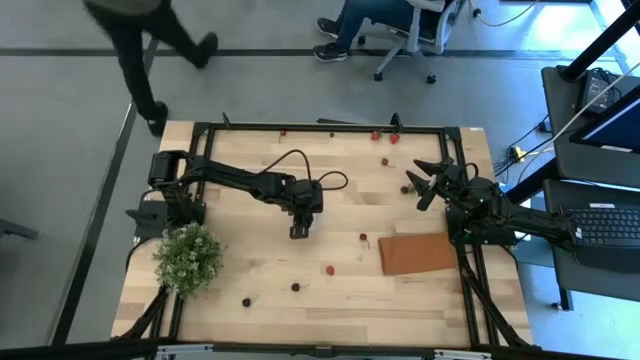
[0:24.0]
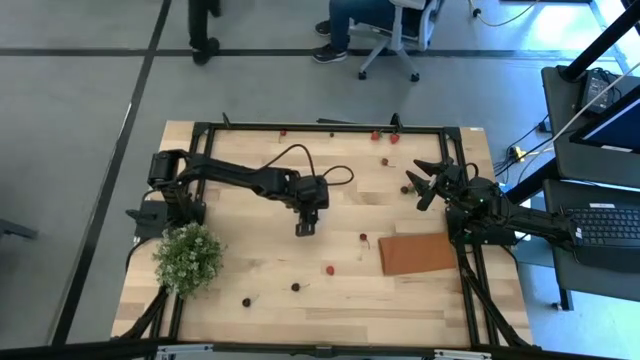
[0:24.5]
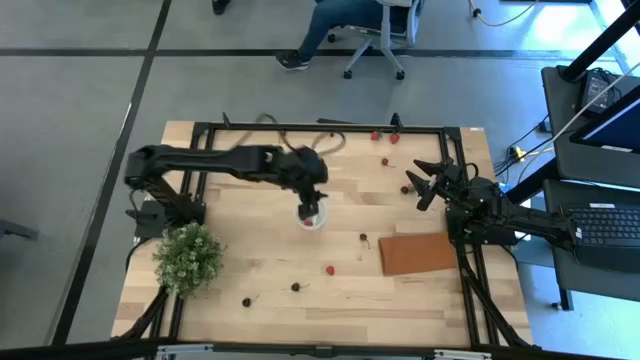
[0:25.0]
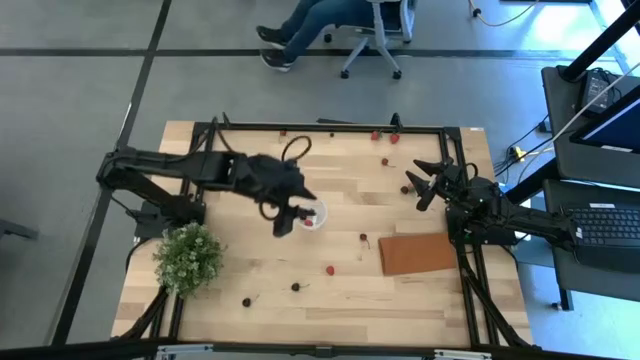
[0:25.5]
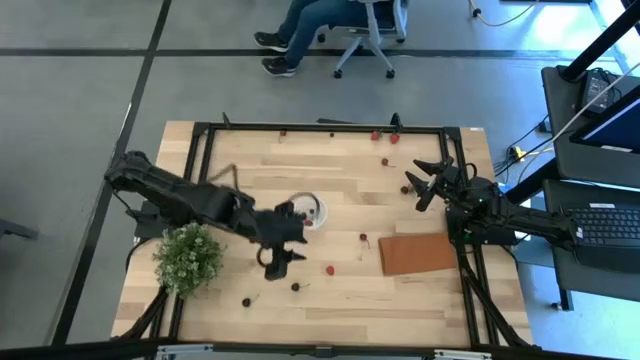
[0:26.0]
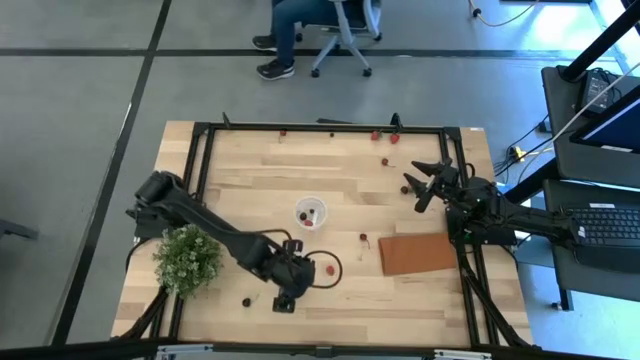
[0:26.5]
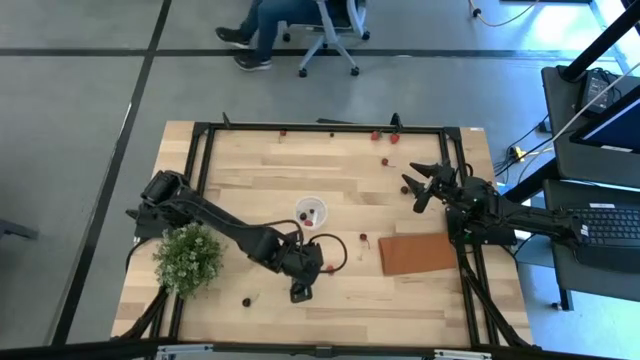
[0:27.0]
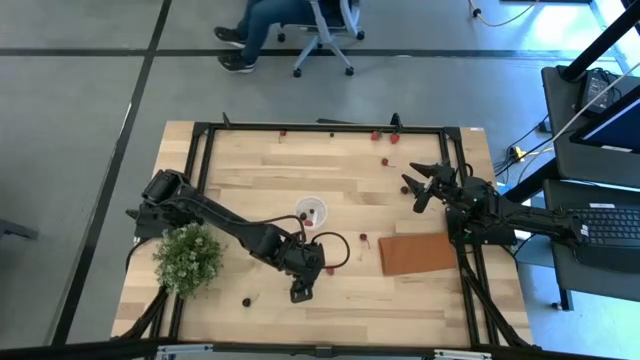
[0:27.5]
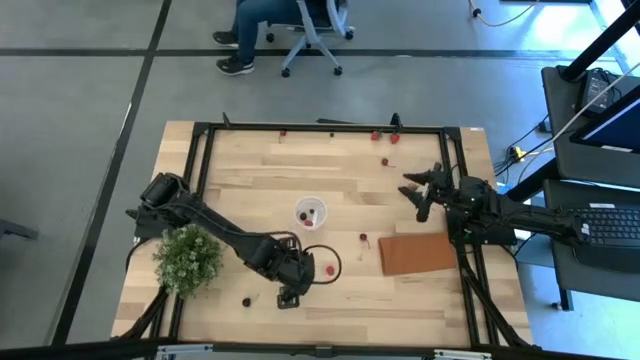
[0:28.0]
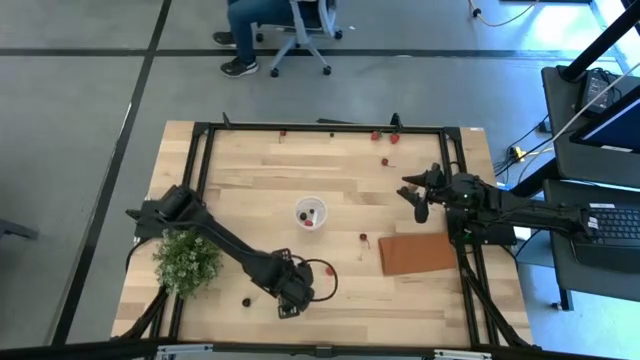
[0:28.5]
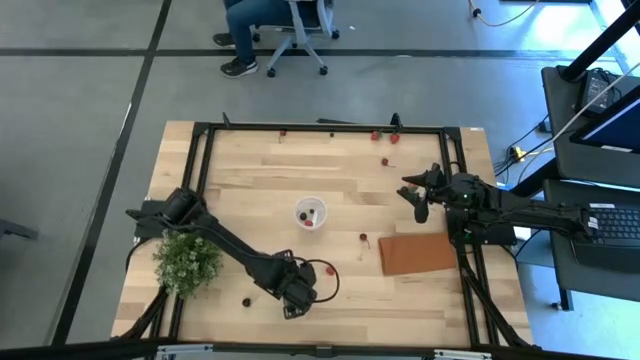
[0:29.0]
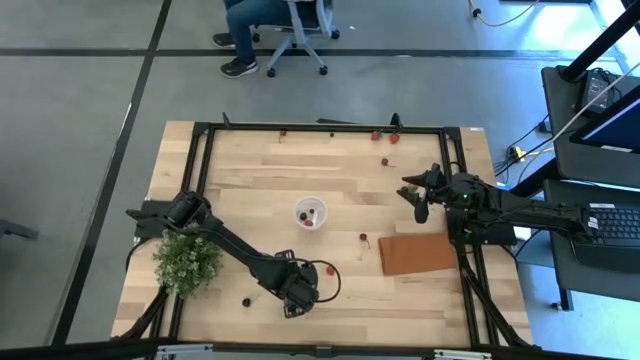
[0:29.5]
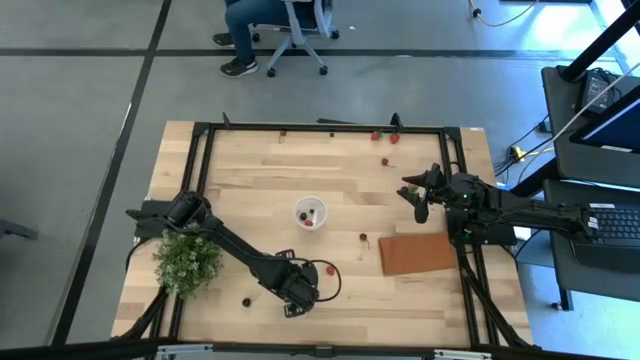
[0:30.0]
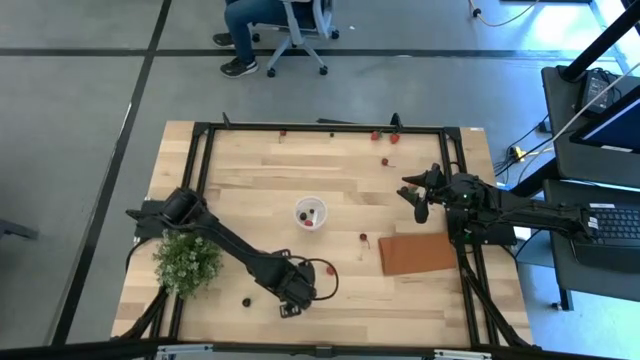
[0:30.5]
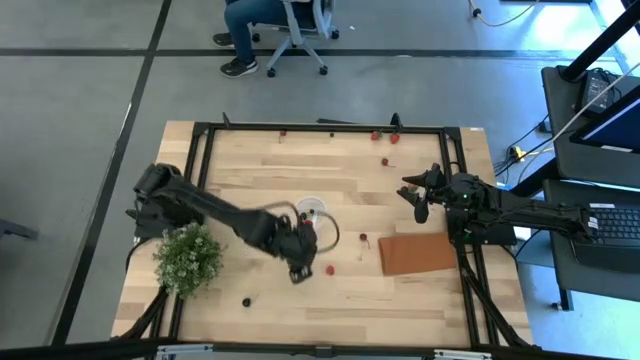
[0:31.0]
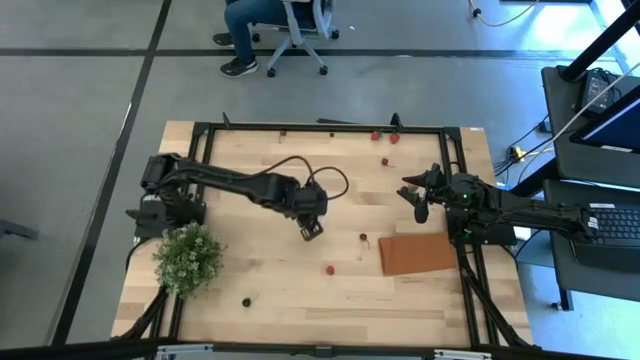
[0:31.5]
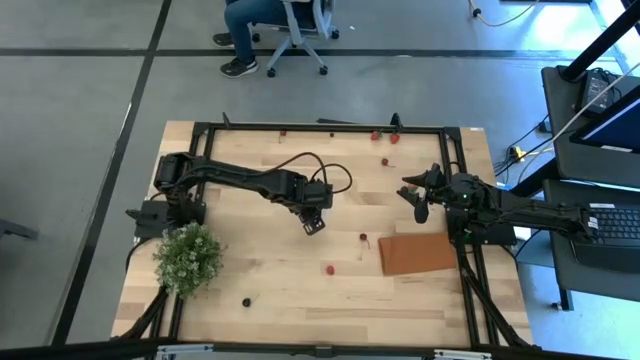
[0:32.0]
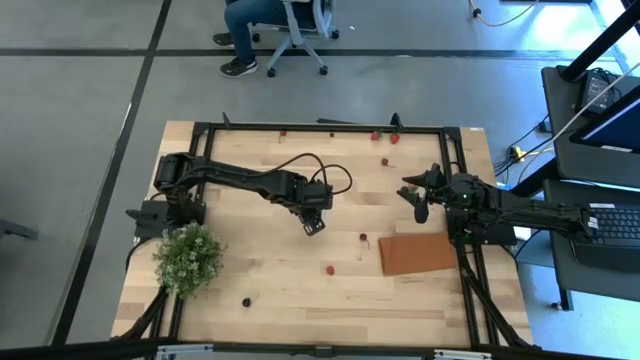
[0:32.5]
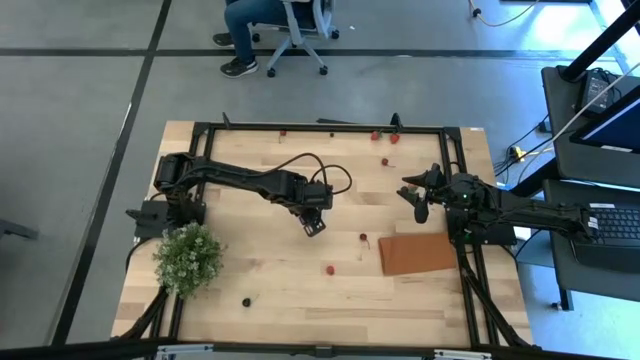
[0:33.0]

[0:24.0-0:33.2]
Task: Pick and placing Produce into tupperware
Put the right black cherry into the bin

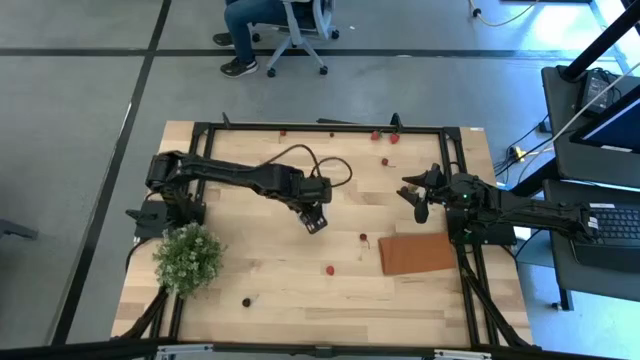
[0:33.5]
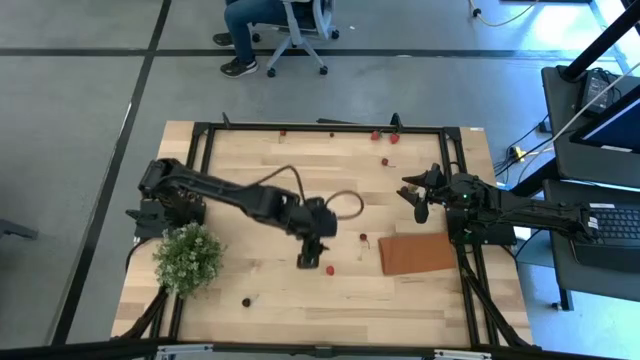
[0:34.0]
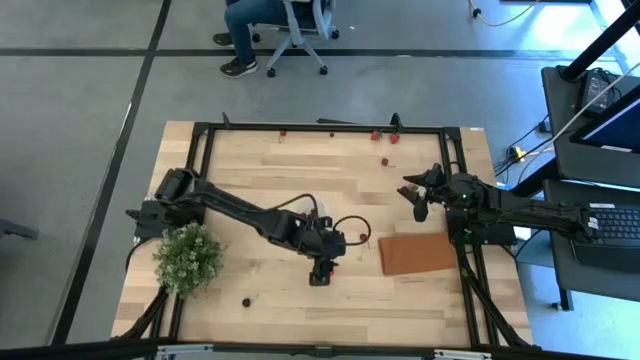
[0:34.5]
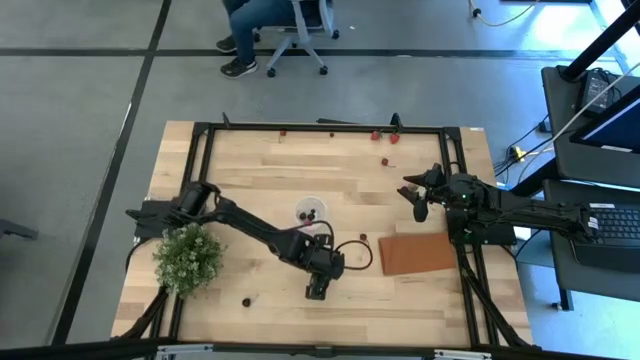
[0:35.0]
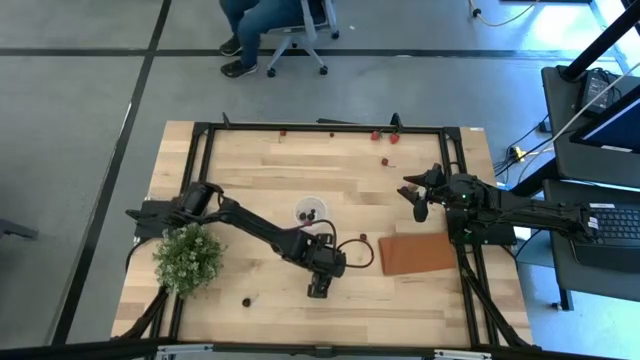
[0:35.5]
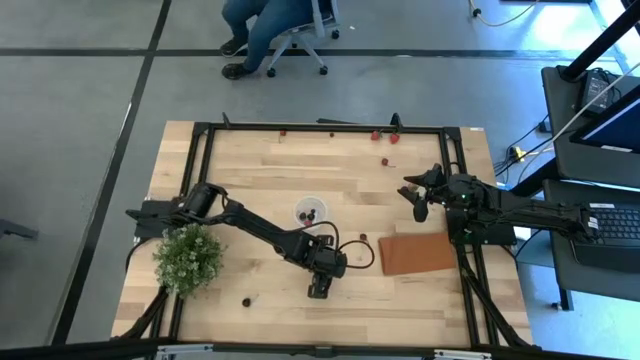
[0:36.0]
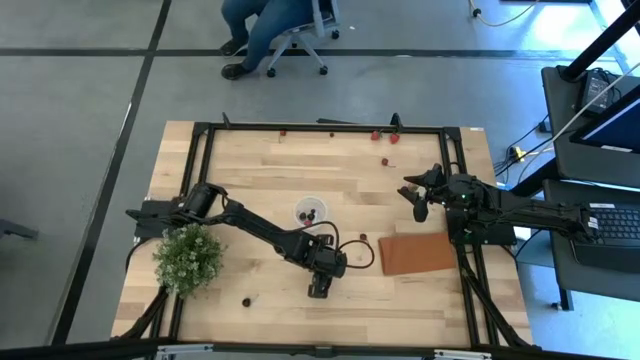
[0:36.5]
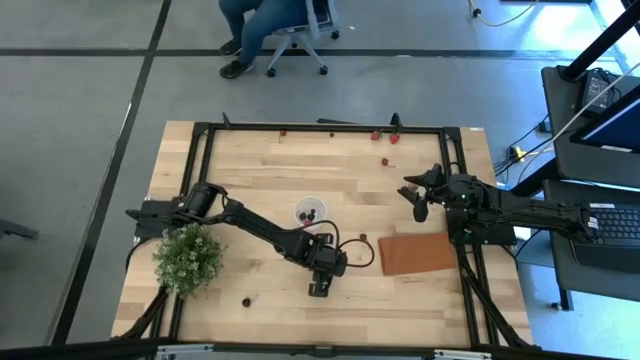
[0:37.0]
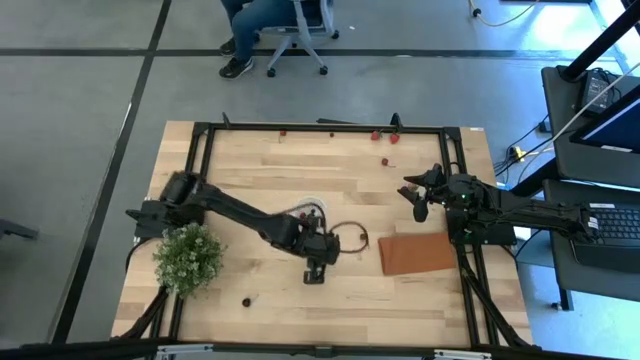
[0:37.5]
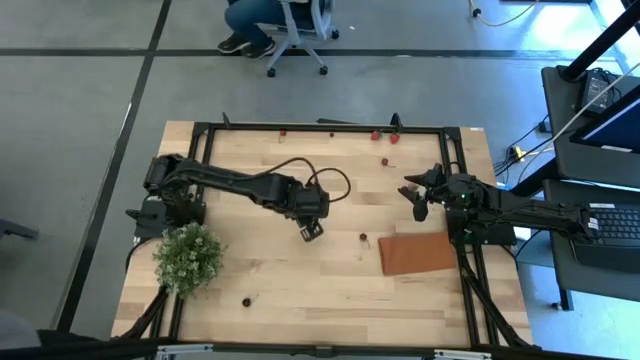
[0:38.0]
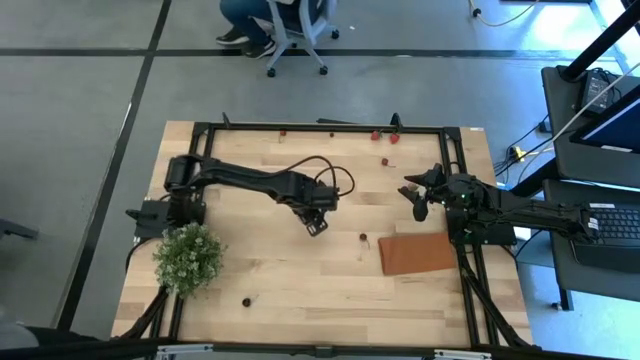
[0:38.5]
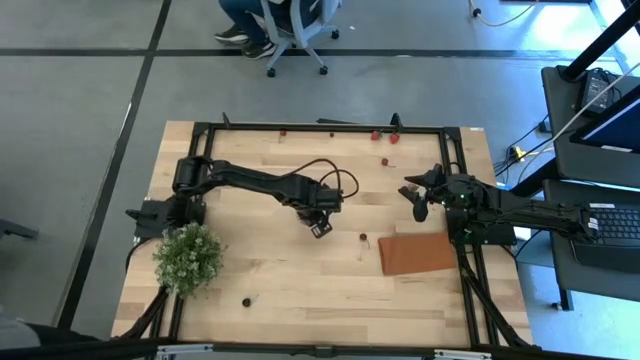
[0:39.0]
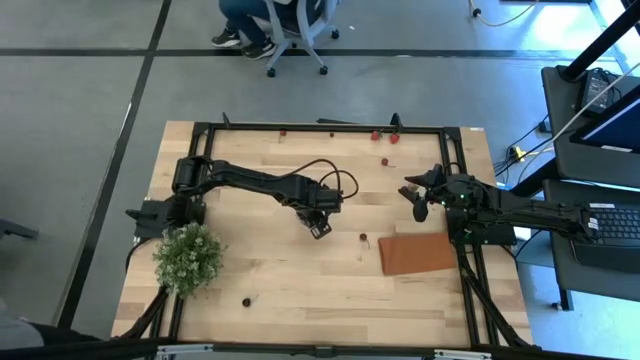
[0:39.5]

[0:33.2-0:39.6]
Put the raspberry into the bin

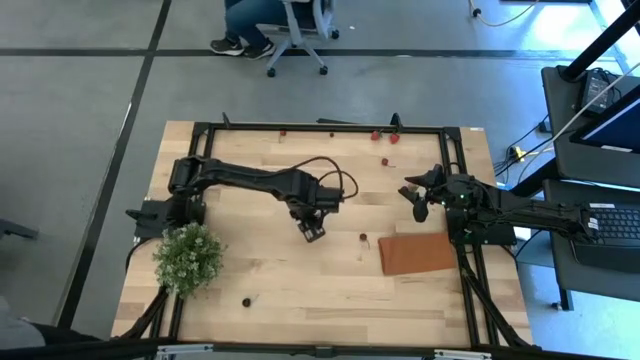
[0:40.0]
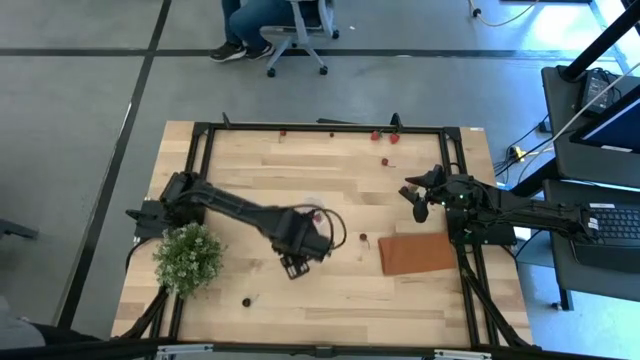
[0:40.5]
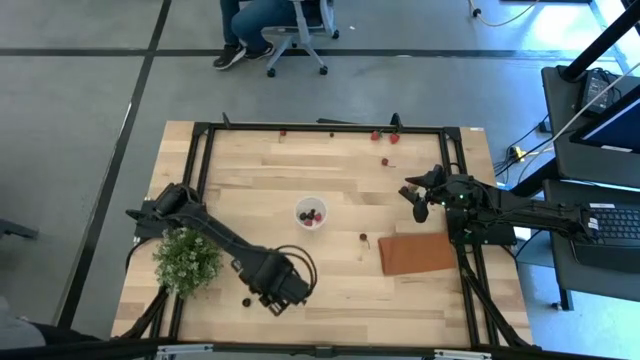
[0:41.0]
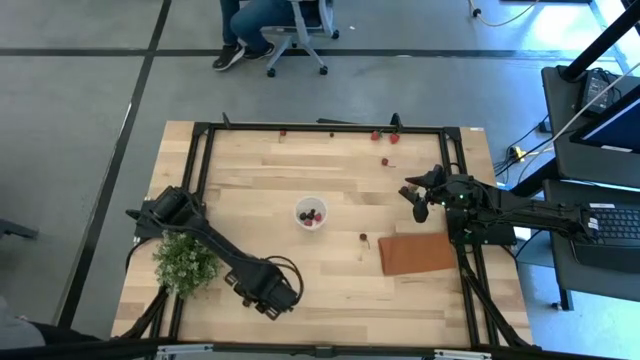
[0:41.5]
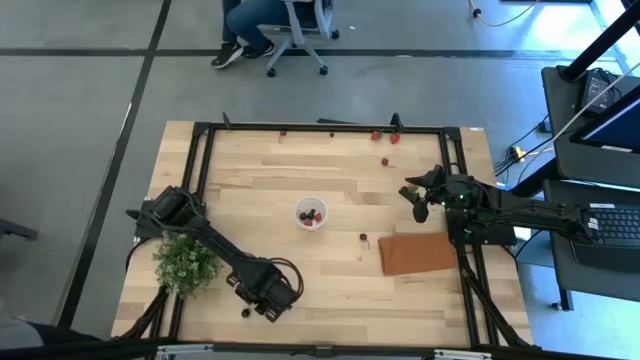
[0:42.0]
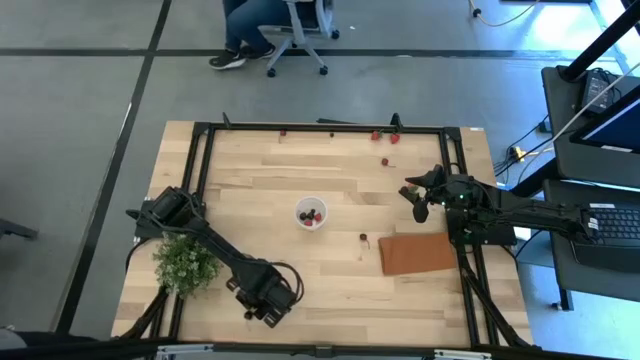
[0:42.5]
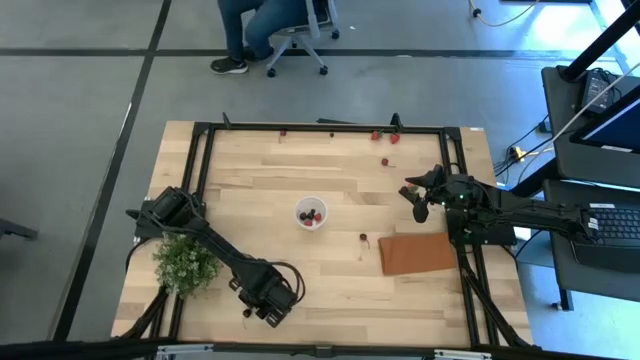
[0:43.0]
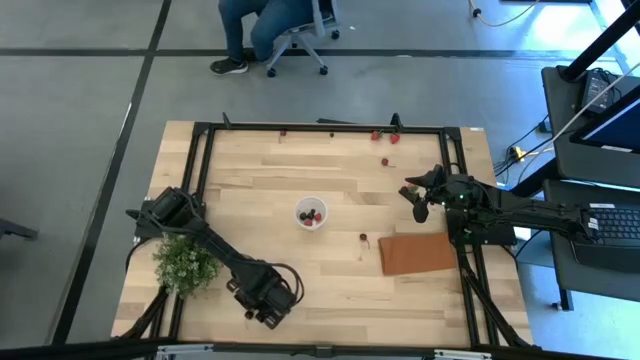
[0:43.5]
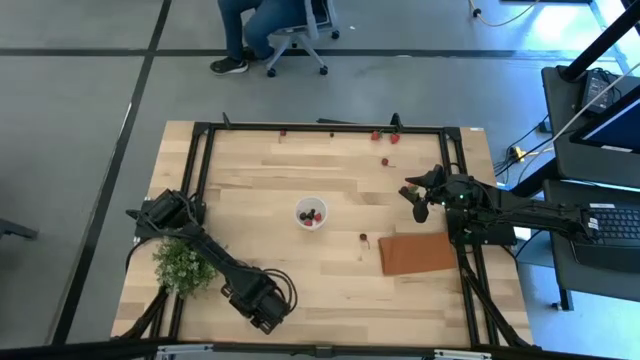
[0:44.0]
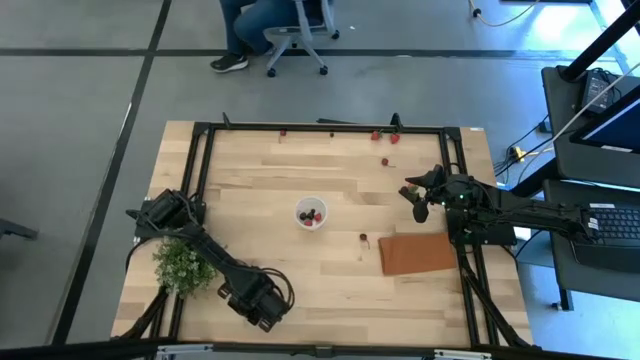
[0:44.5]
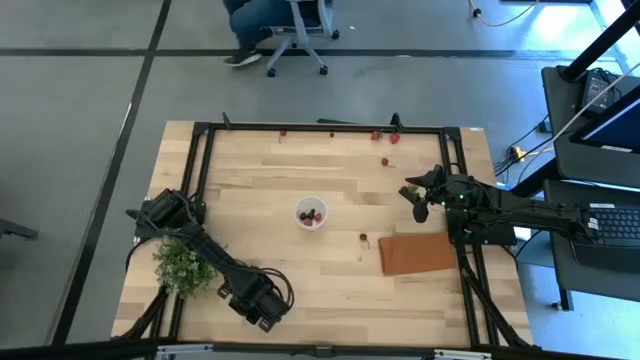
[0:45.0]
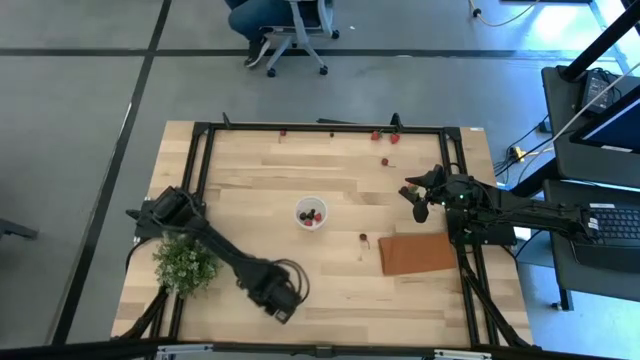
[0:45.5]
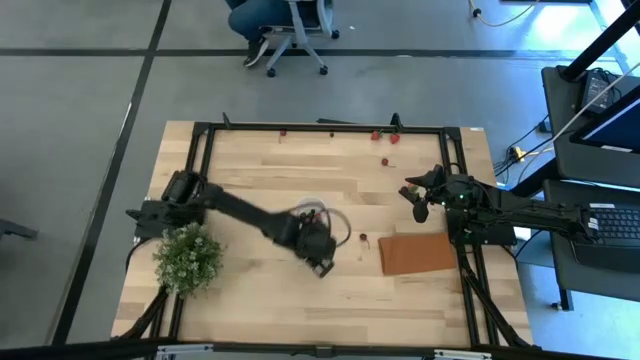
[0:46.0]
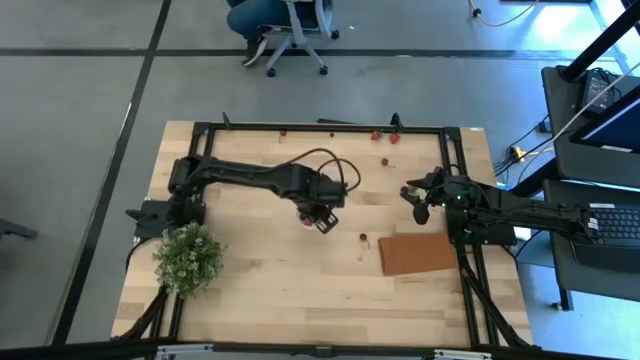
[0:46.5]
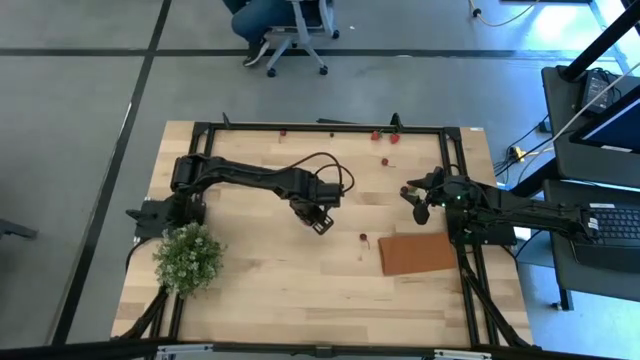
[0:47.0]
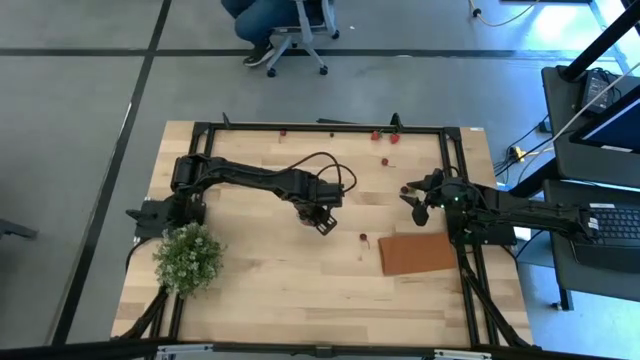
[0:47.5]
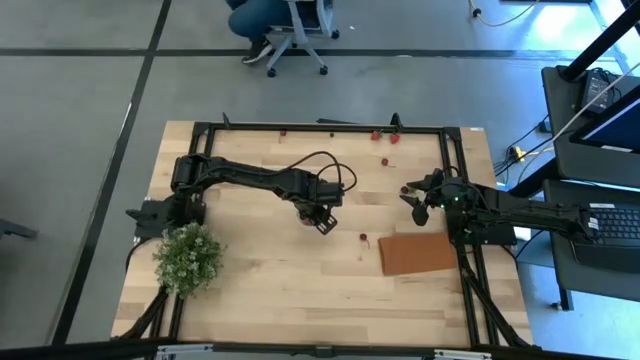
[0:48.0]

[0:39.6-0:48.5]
Put the black cherry into the bin
